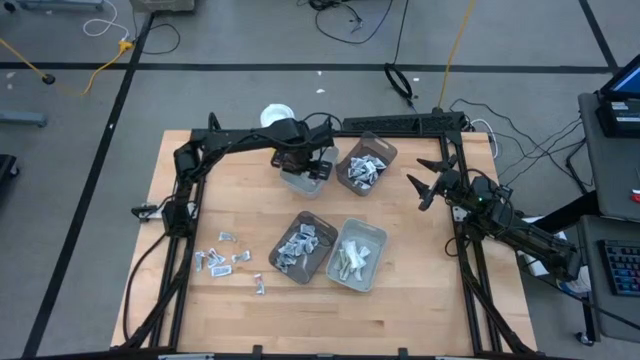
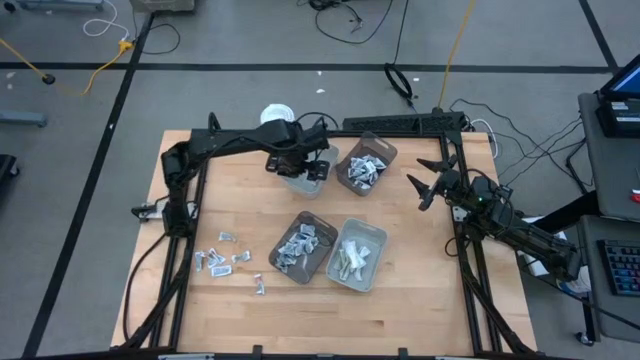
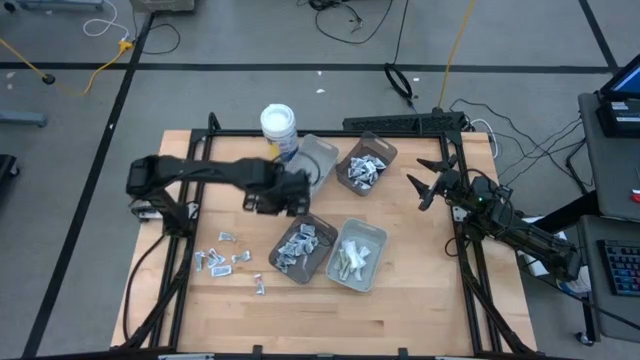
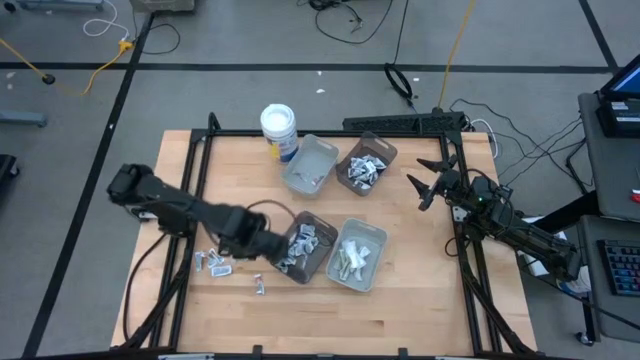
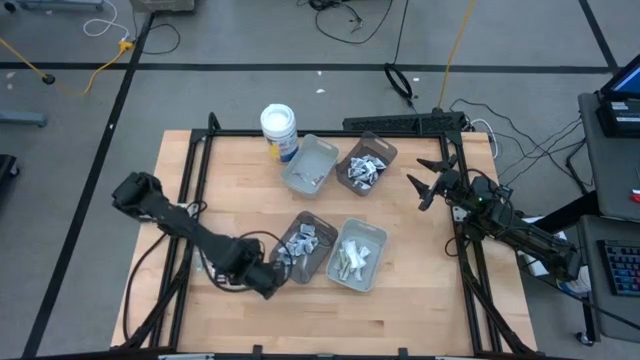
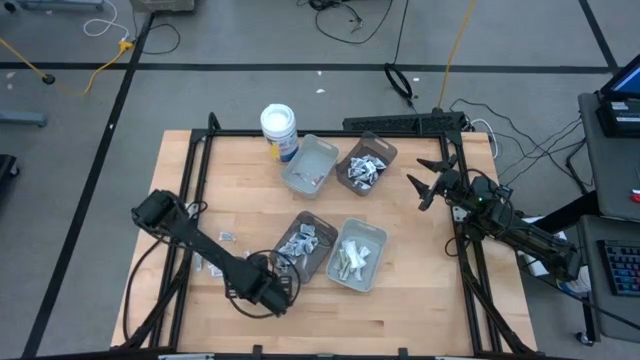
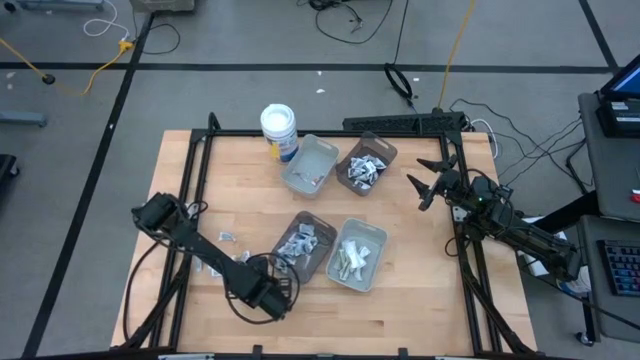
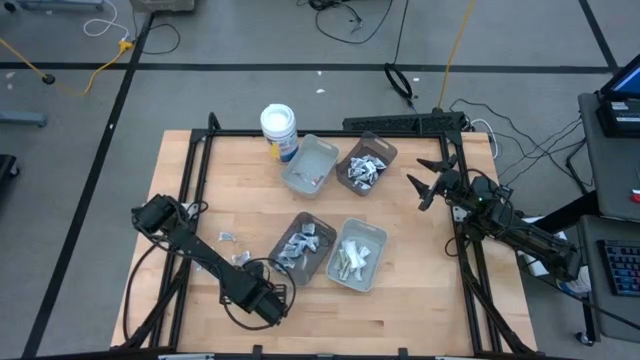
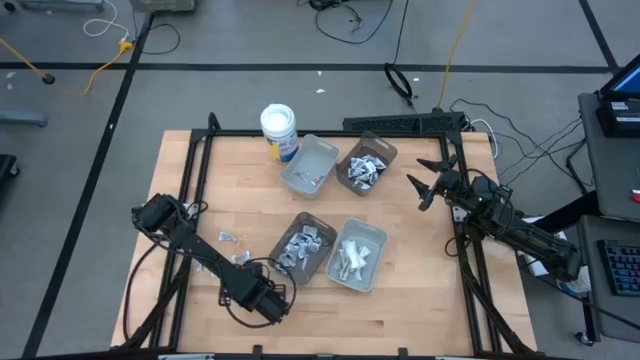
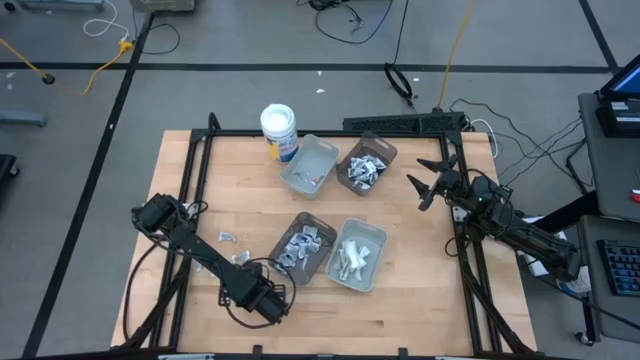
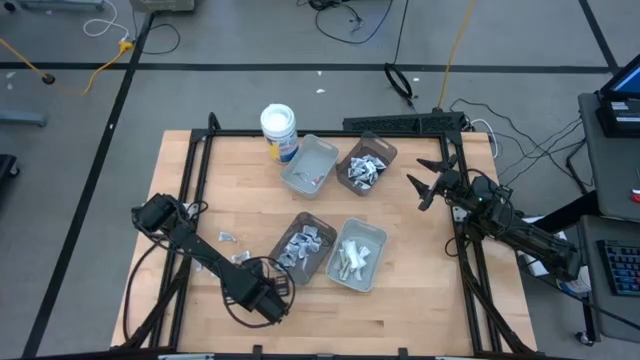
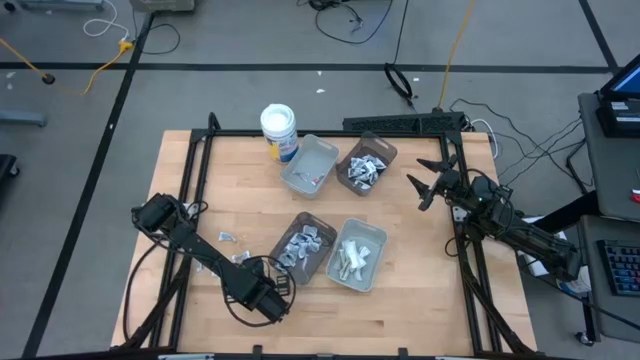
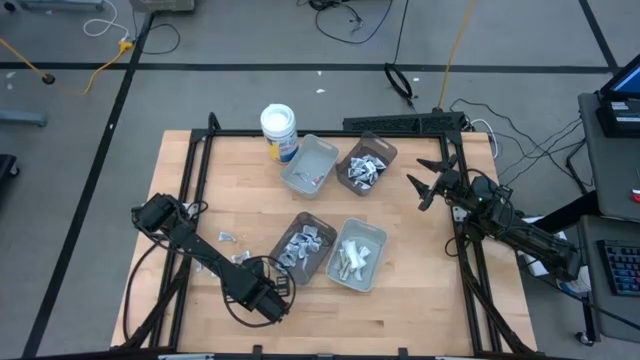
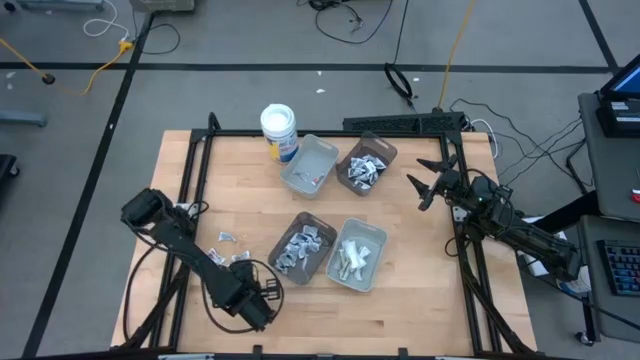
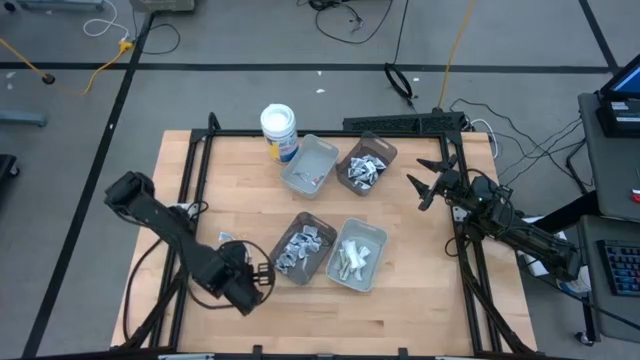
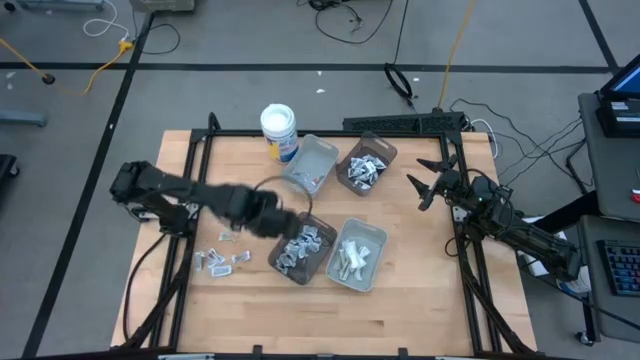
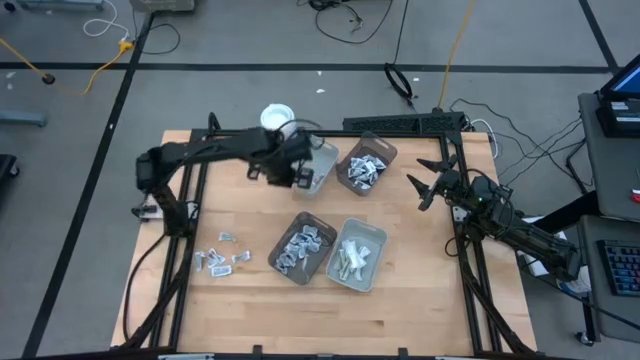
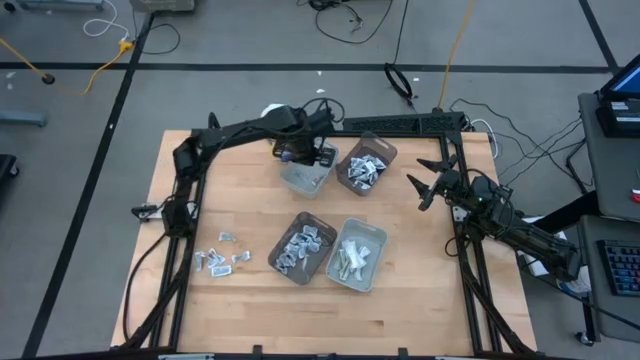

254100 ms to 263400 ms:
Task: Pick & Place First Aid Supplies
Put the orange ointment pack into the top gray bin

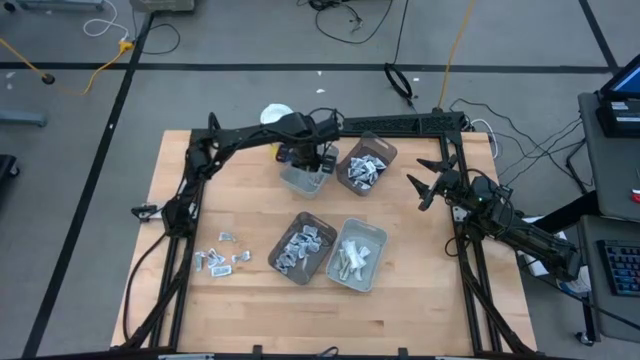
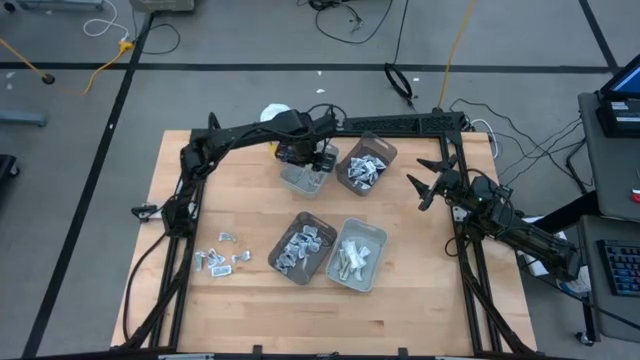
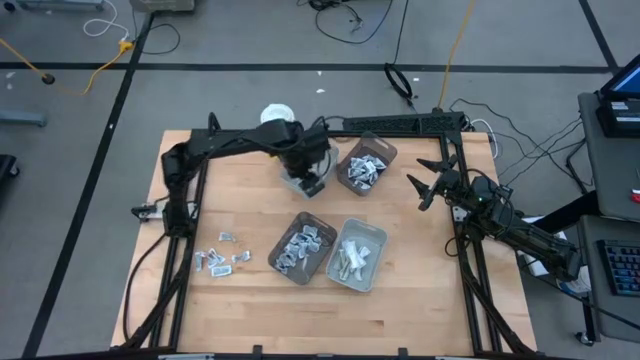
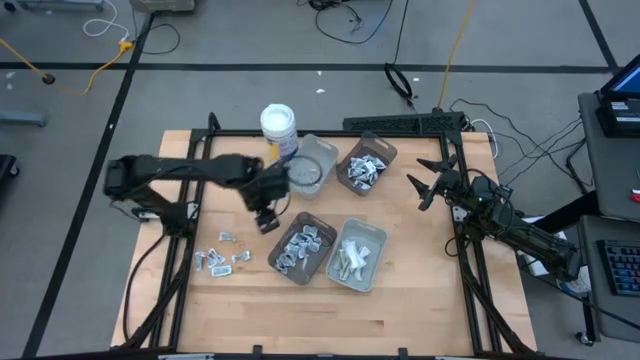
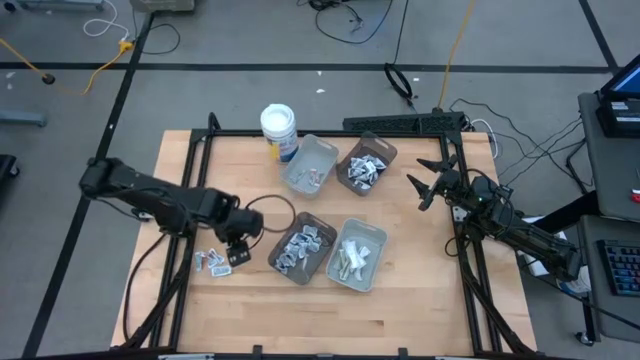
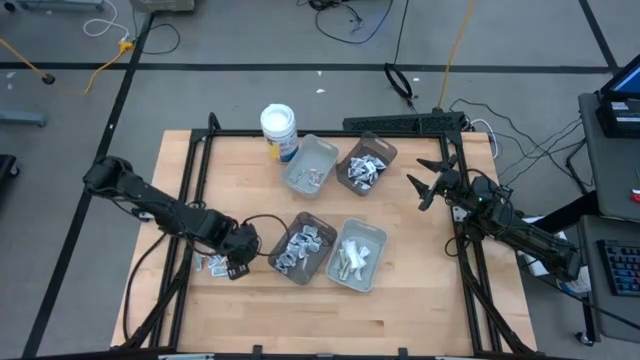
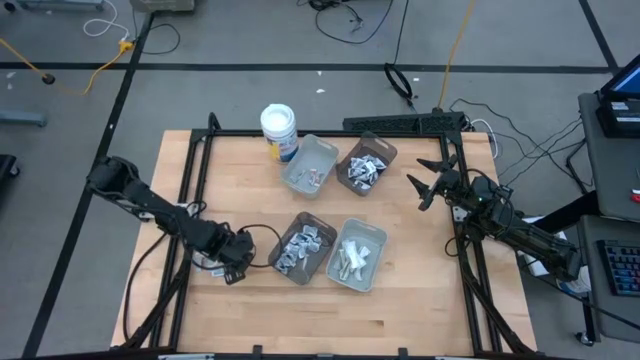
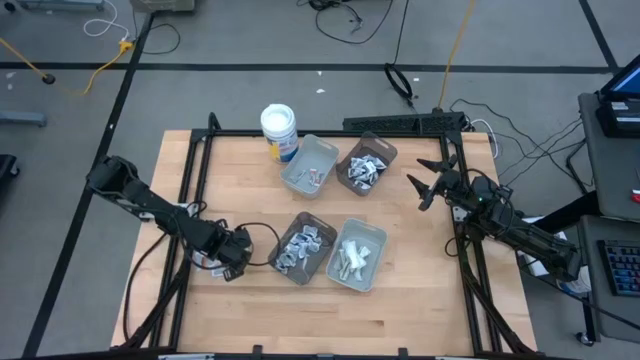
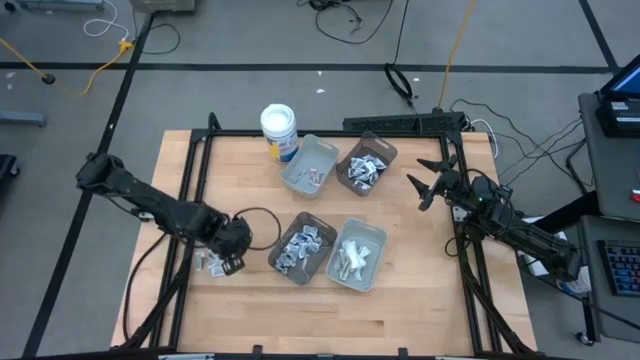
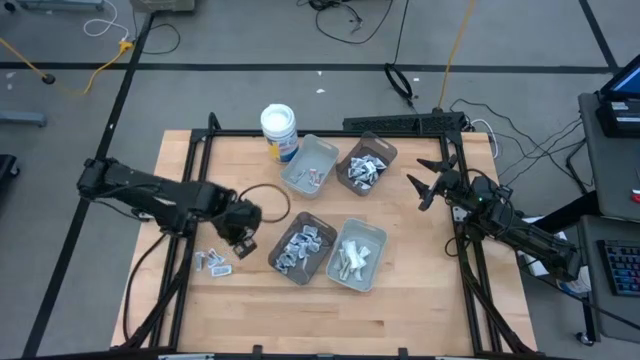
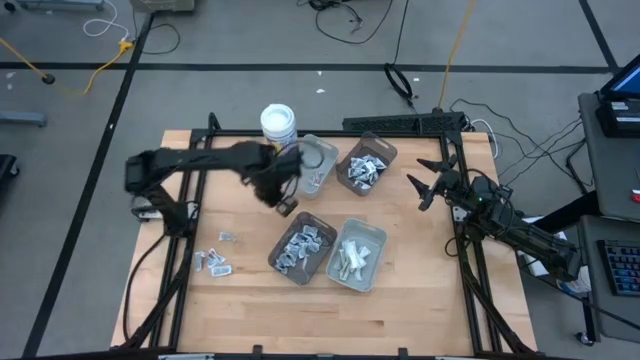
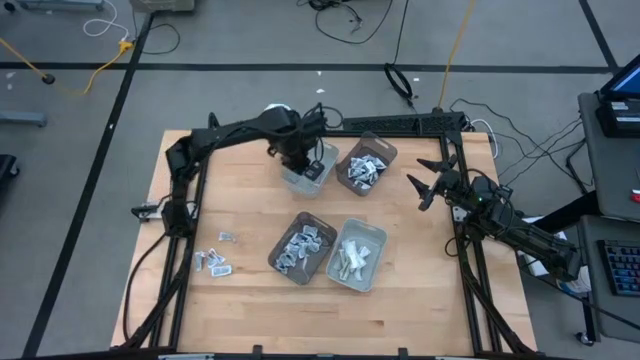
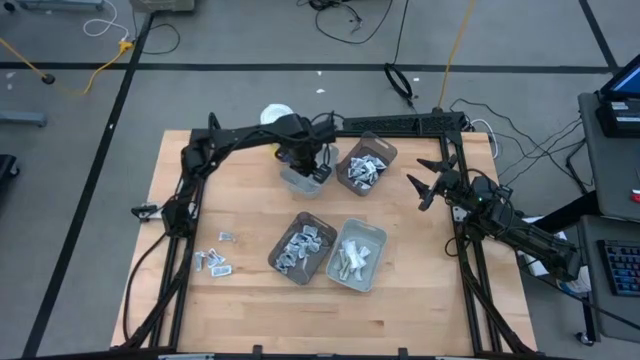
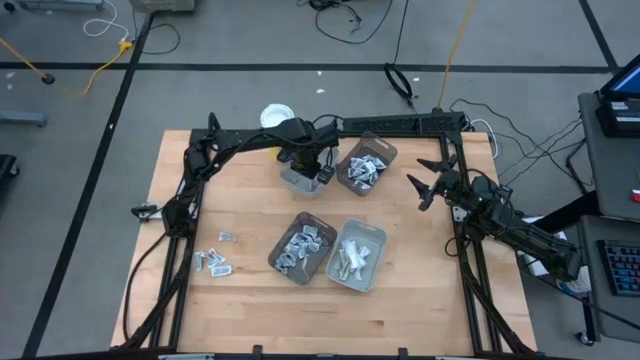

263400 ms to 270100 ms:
Put the orange ointment pack into the top gray bin

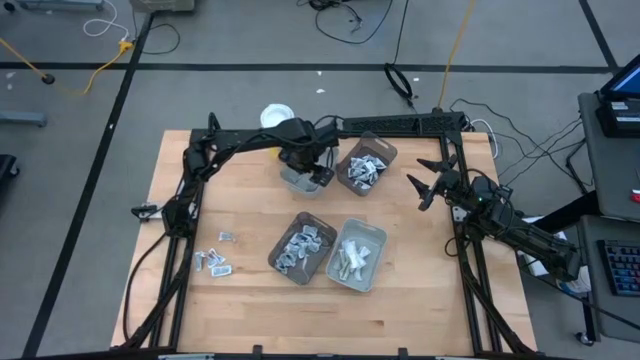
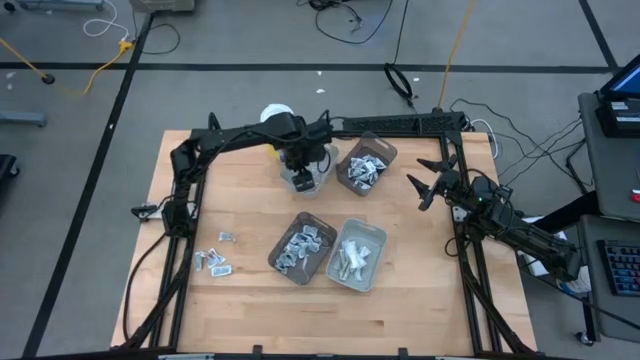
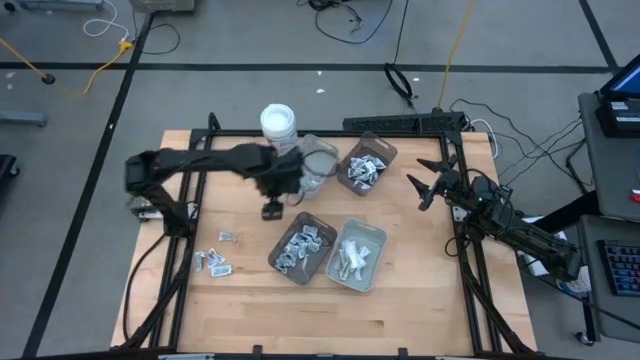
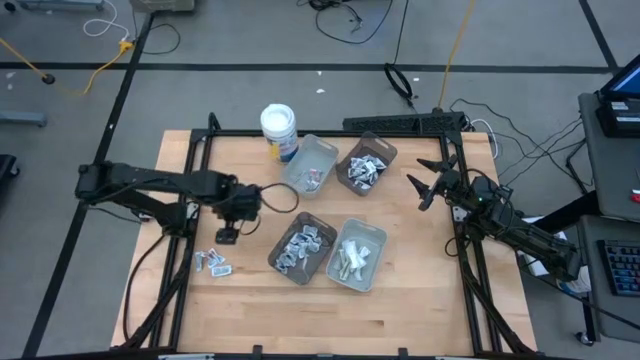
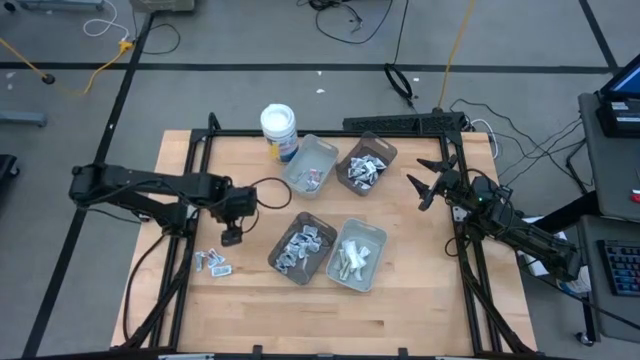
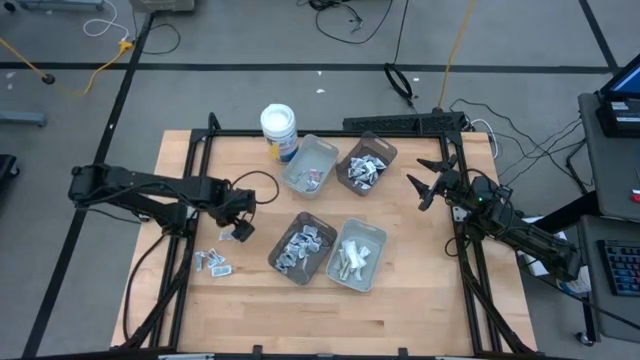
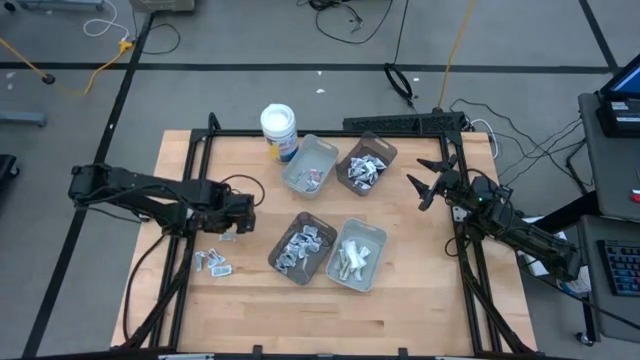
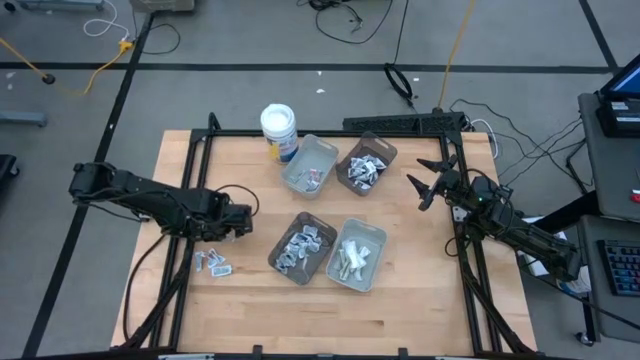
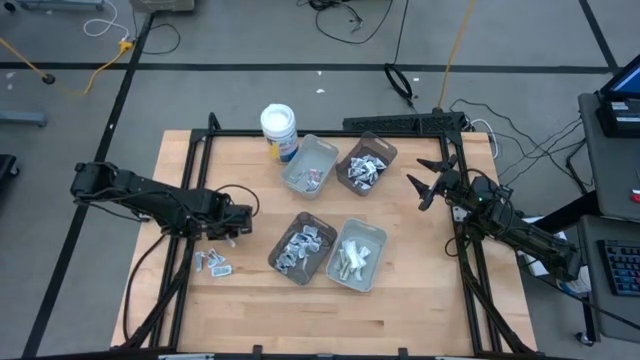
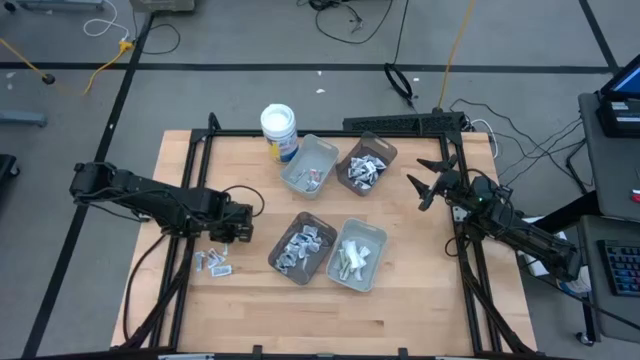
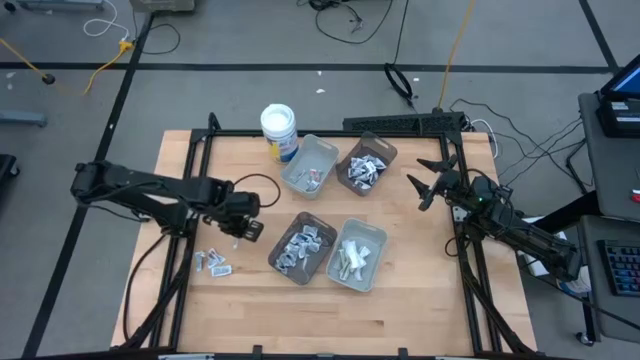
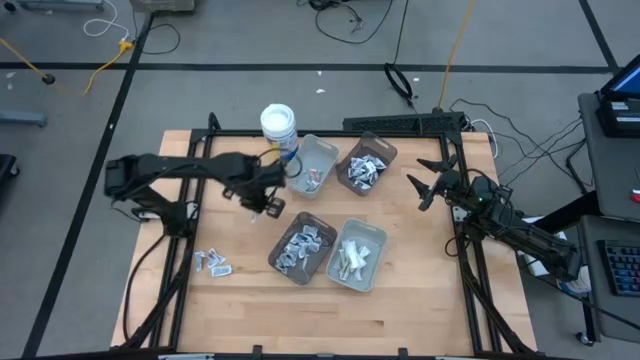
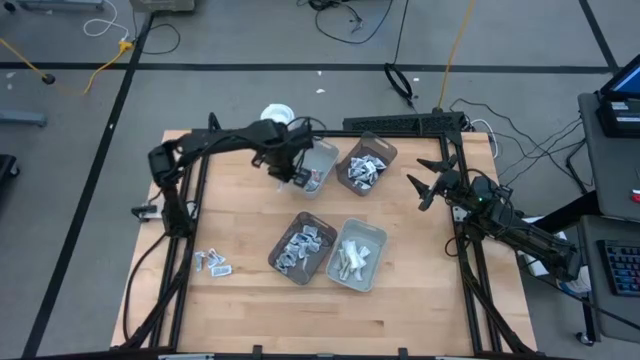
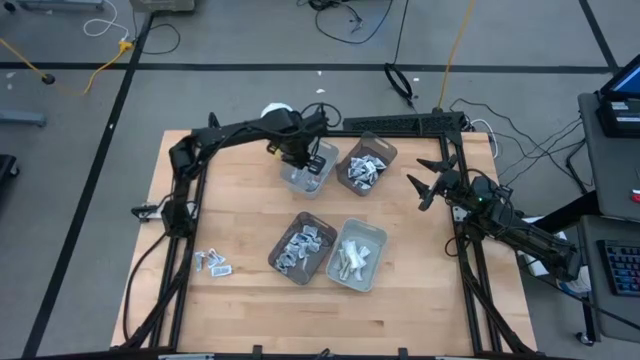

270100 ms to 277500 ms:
Put the orange ointment pack into the top gray bin
